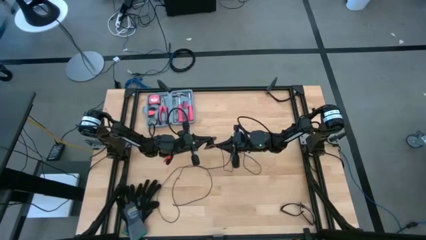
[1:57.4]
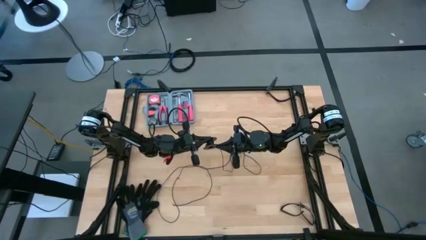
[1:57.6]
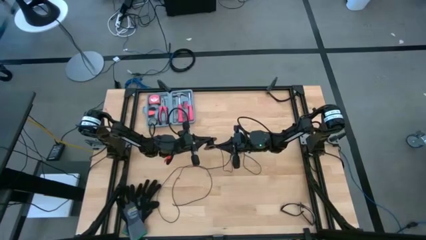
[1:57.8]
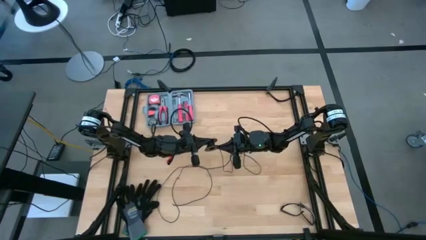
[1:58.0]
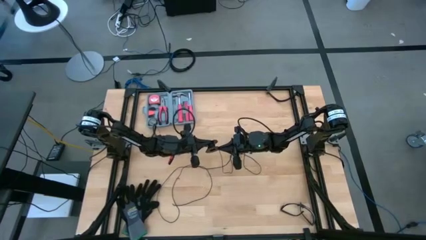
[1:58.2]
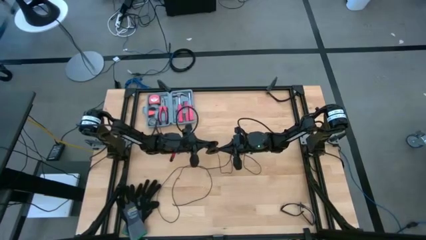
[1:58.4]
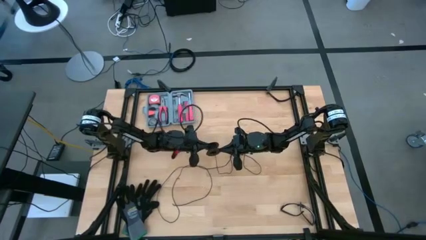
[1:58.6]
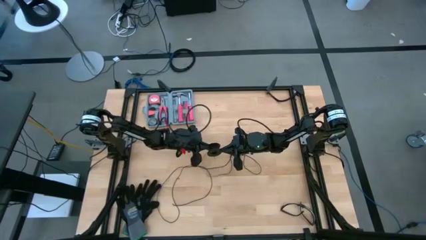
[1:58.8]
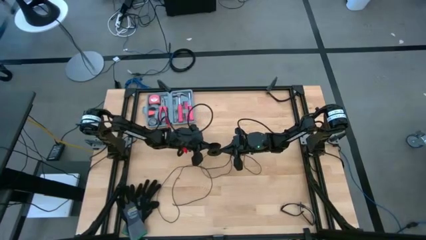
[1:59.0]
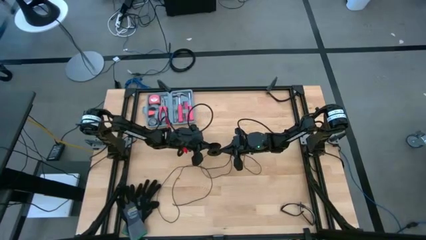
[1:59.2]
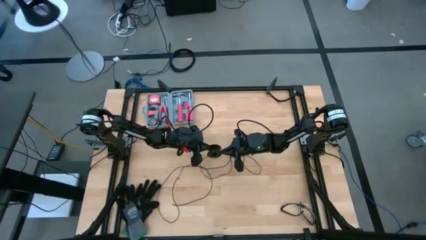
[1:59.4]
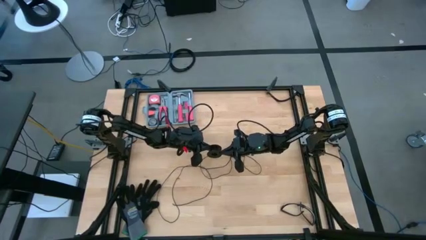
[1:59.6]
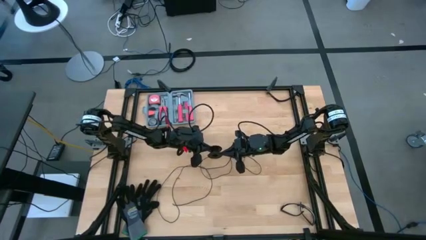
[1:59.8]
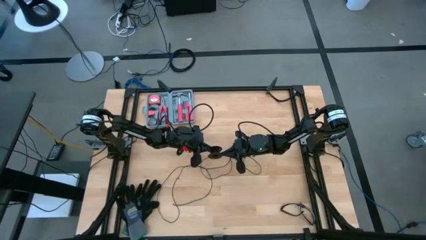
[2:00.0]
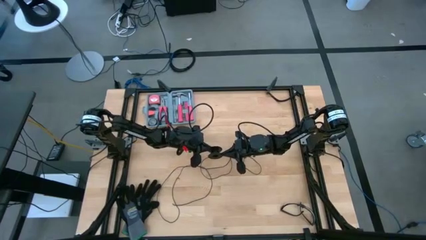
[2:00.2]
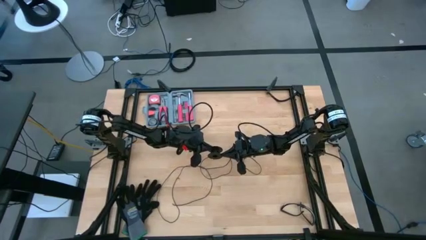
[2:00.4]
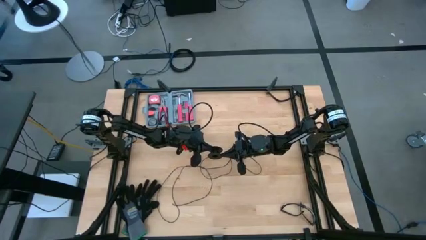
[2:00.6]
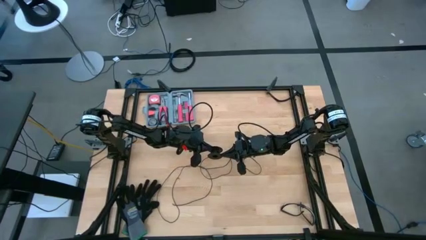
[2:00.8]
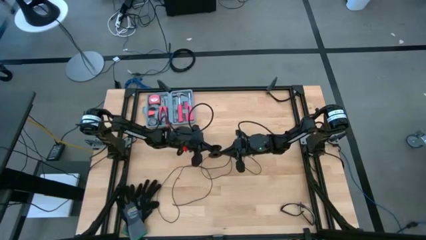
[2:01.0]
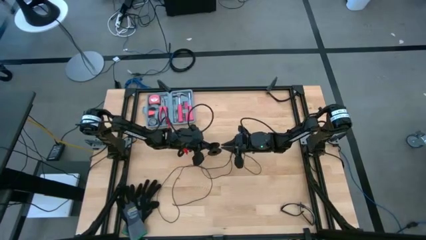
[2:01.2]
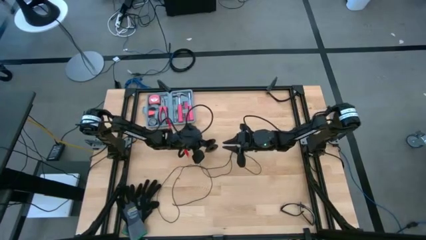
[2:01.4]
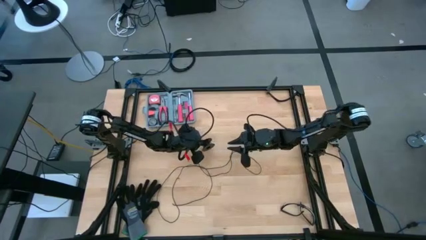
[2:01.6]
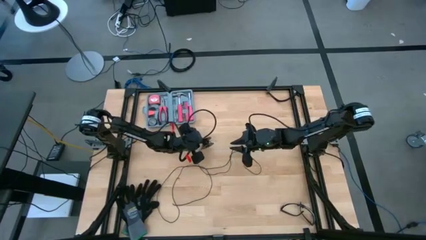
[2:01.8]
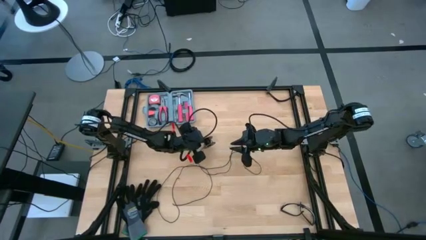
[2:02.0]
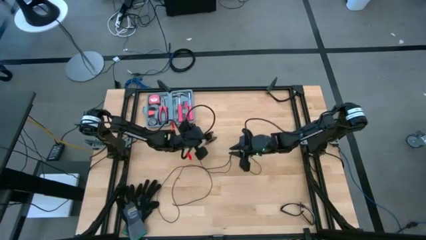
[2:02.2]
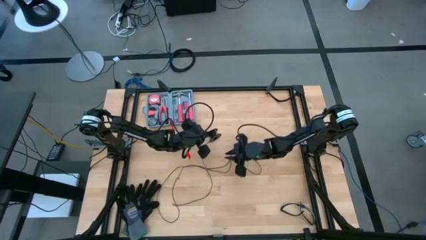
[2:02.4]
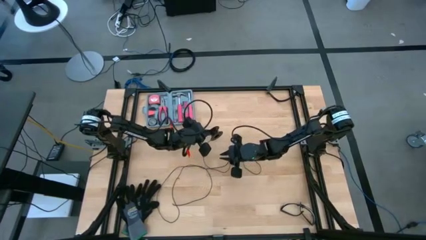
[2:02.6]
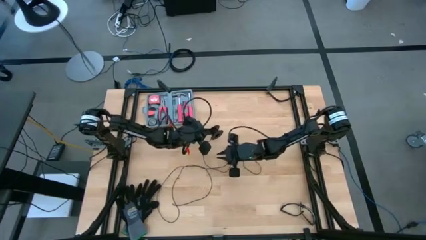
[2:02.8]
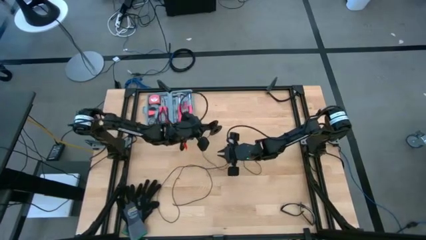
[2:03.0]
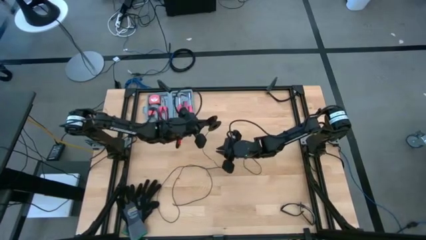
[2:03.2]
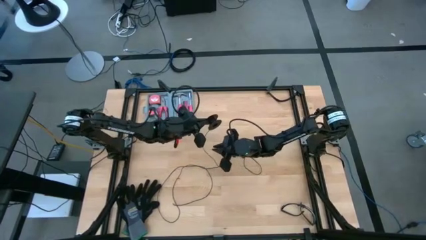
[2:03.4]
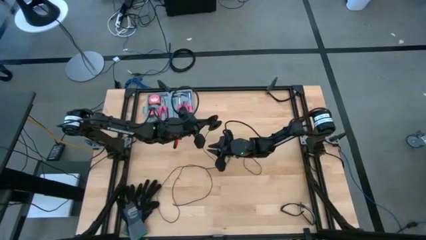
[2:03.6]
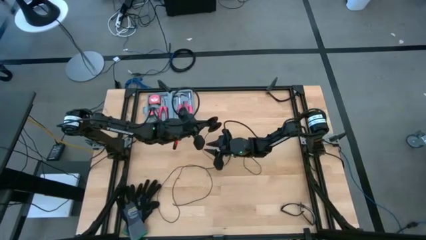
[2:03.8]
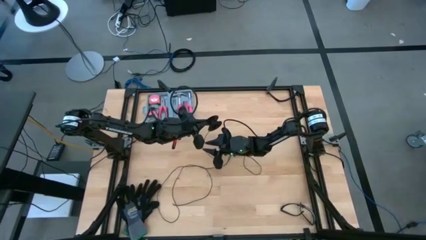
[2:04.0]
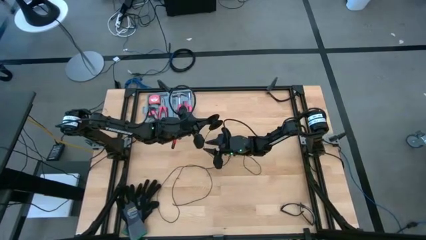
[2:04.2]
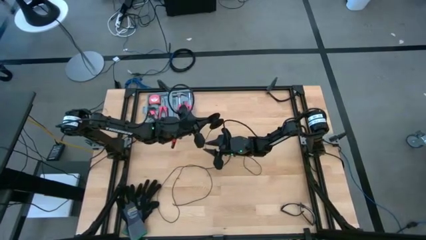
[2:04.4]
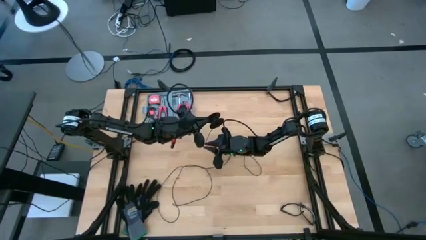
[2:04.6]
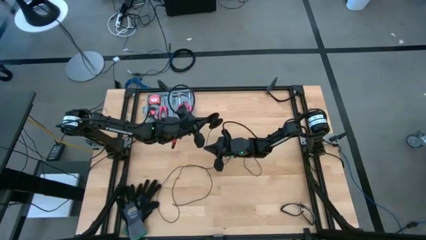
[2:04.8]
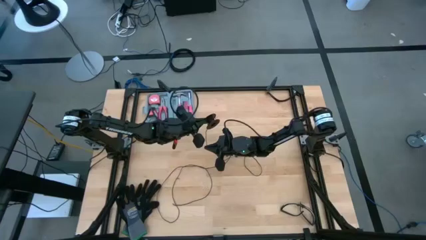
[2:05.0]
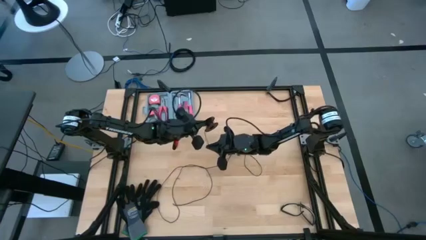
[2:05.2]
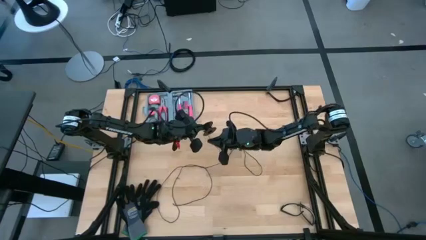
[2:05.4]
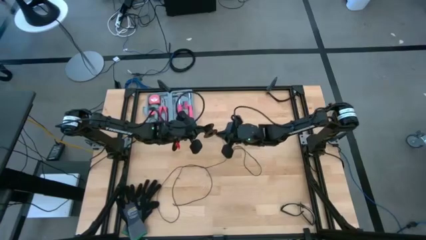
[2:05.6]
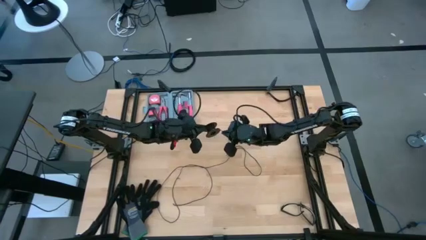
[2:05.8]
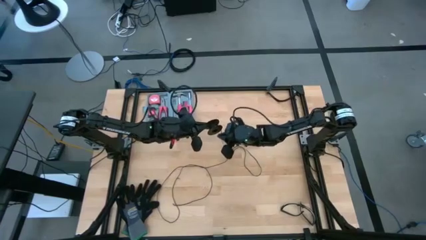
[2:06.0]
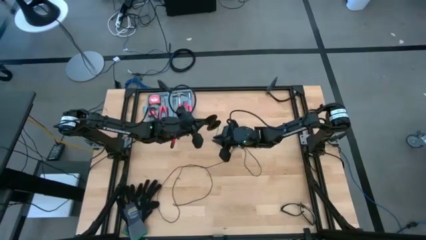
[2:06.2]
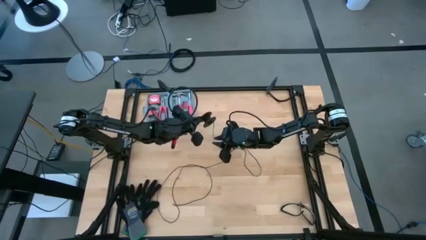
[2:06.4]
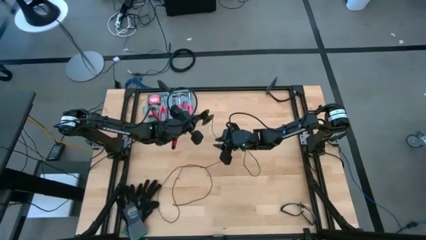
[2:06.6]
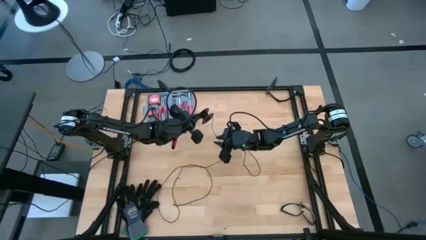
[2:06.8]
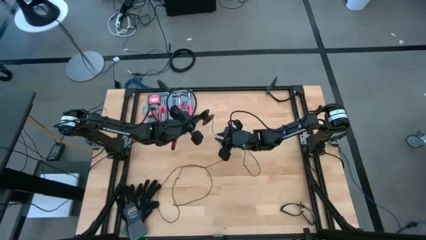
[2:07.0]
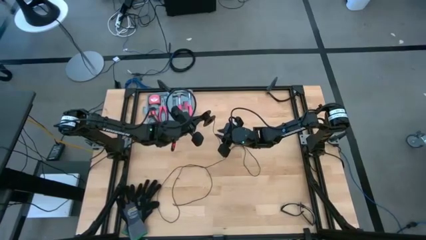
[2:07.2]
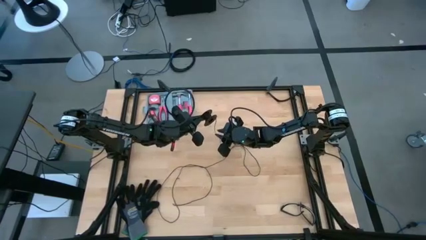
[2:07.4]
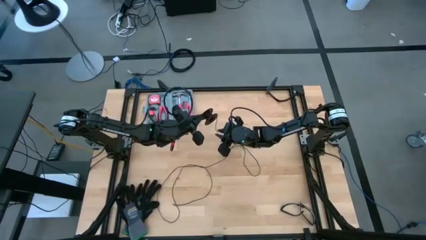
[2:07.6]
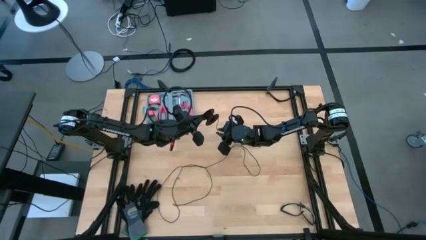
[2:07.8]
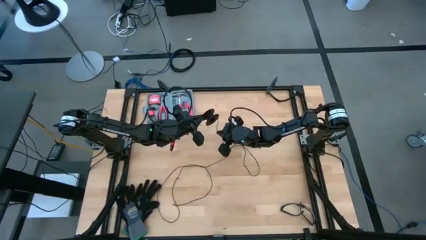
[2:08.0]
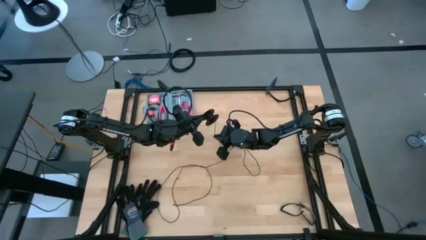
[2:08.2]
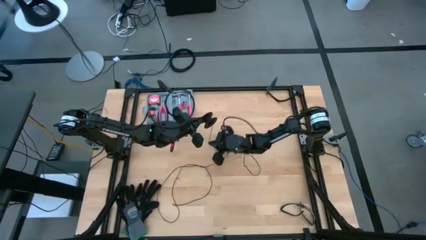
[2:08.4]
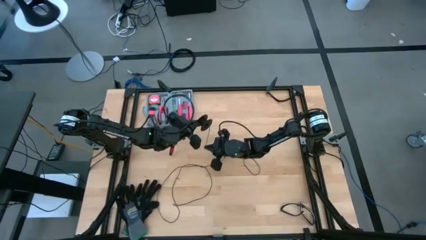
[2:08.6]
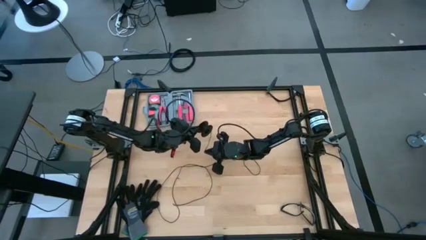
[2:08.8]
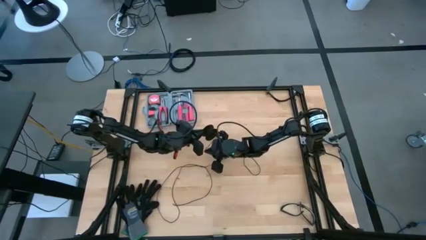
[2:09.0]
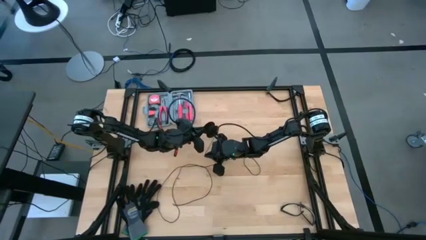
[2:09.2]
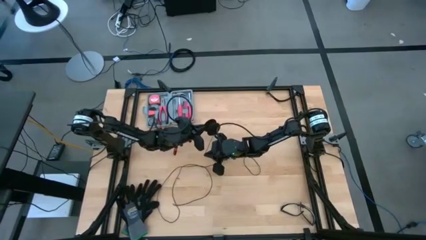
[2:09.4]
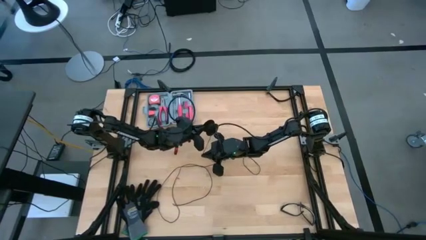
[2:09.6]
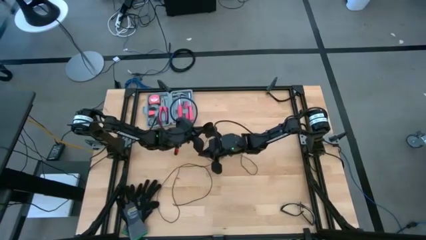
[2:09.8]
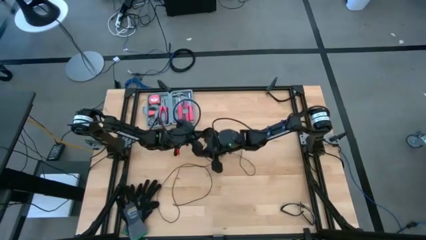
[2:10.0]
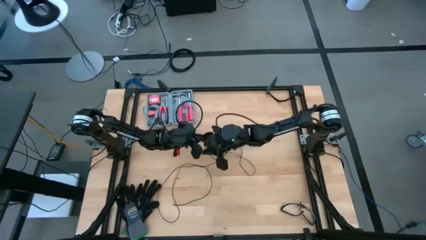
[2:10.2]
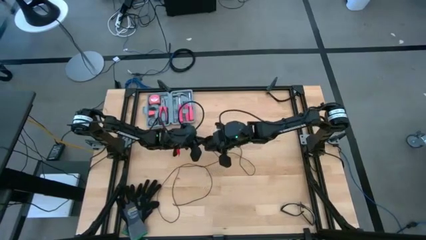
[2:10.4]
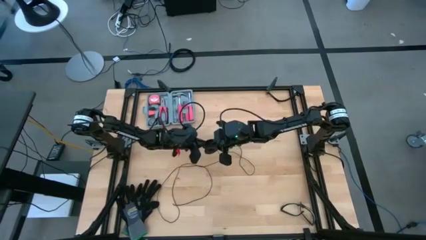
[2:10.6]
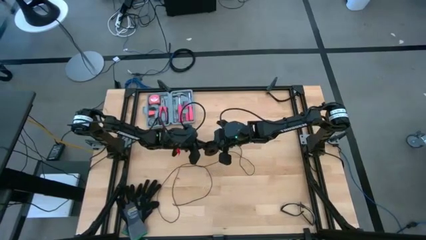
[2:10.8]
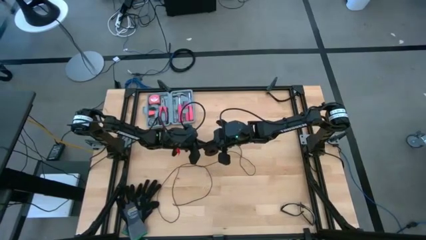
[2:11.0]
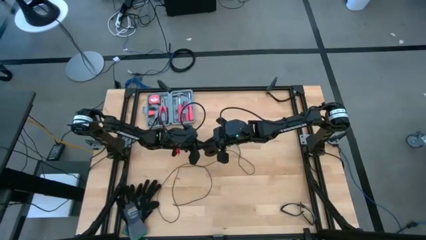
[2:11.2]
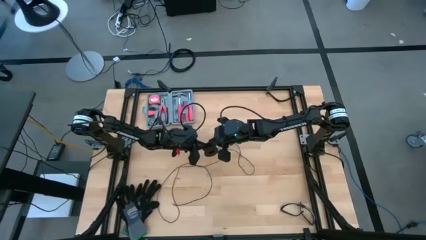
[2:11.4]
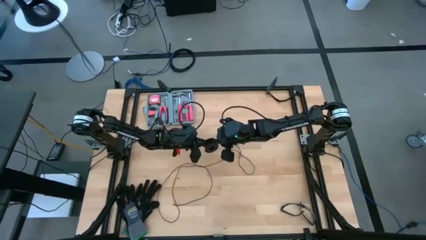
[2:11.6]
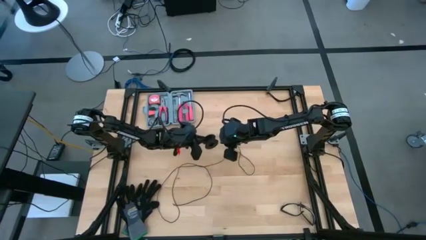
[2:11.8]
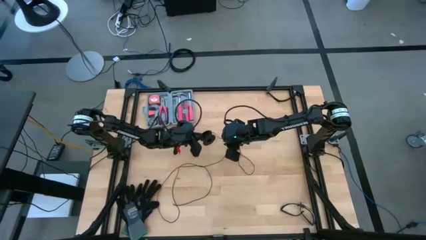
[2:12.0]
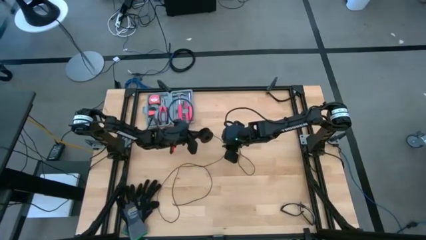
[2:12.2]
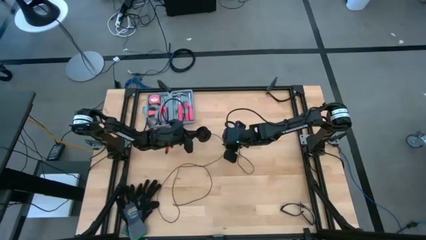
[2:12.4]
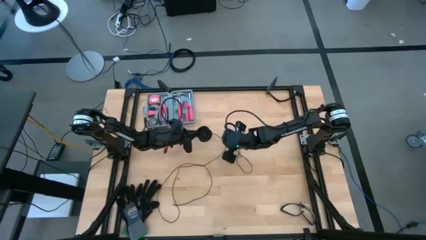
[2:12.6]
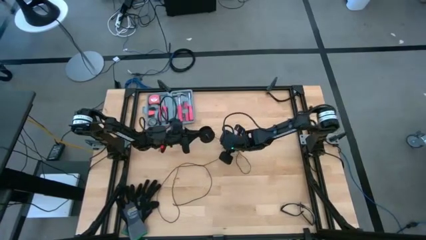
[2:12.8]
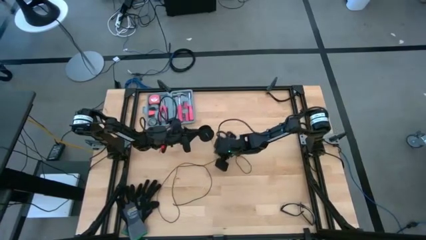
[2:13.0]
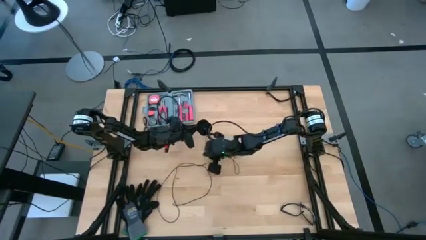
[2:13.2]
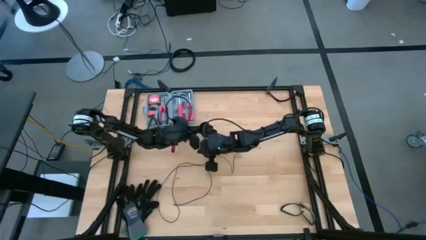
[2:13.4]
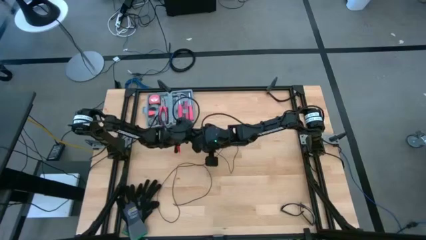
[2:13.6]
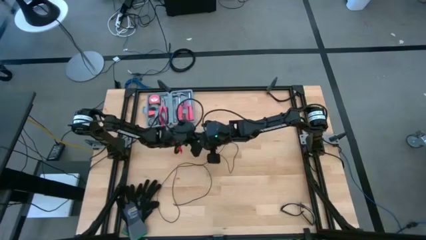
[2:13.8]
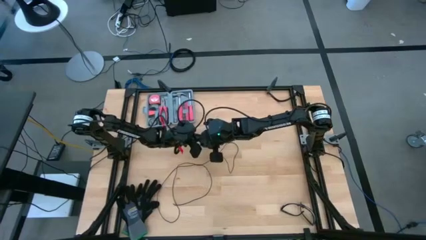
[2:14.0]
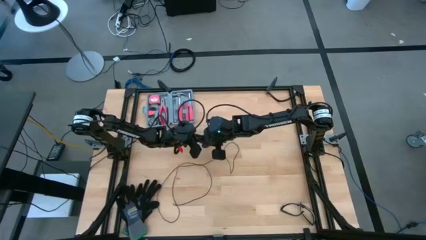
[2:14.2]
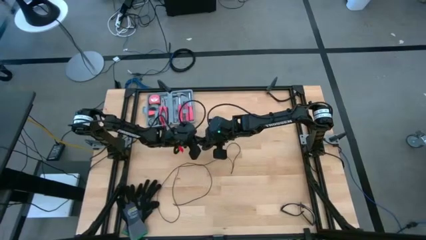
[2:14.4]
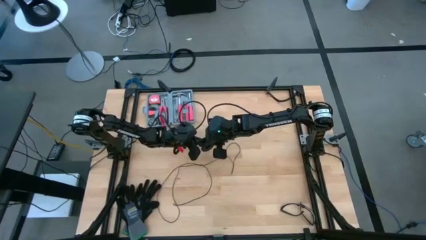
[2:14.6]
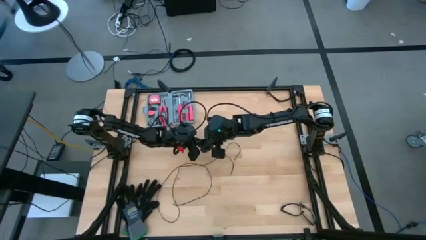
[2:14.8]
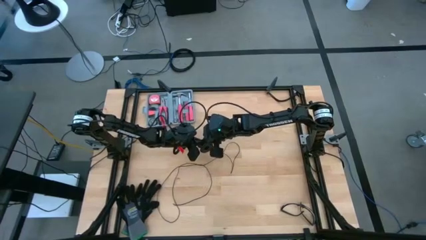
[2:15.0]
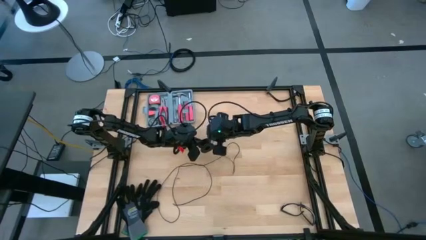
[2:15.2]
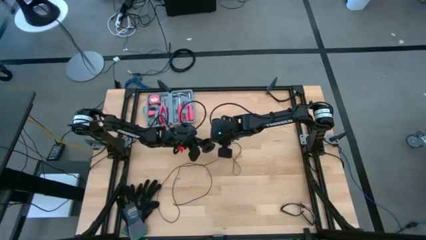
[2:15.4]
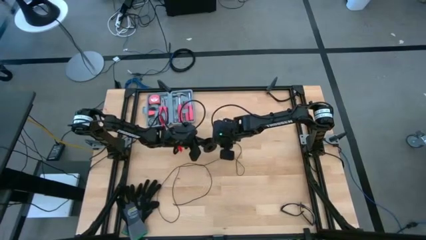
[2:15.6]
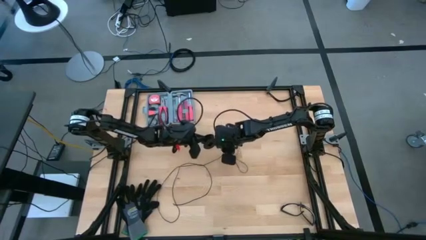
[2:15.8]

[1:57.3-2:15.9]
Task: Coil cords
Coil the black wire onto the spool
